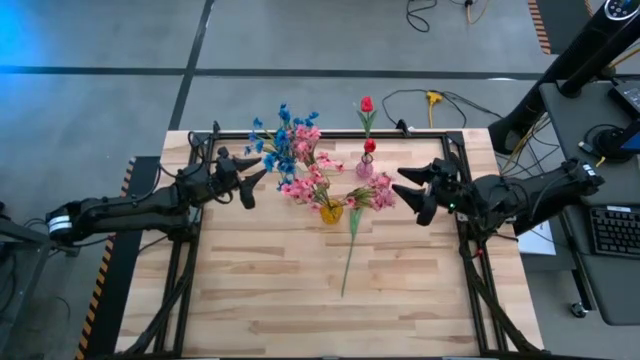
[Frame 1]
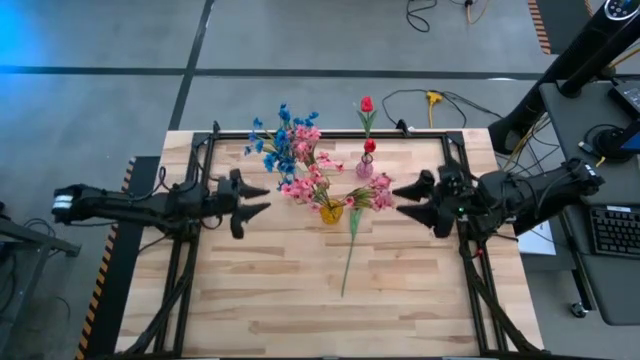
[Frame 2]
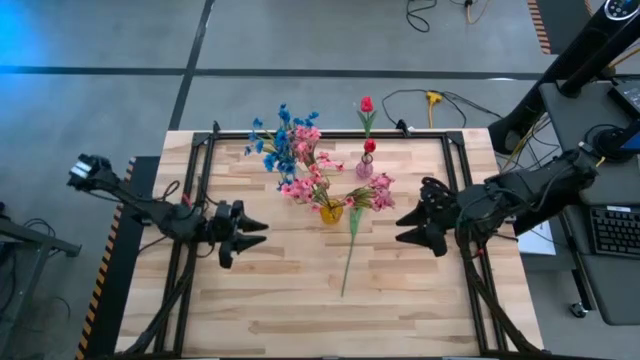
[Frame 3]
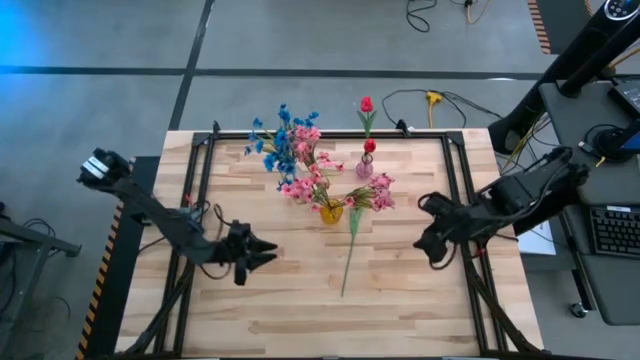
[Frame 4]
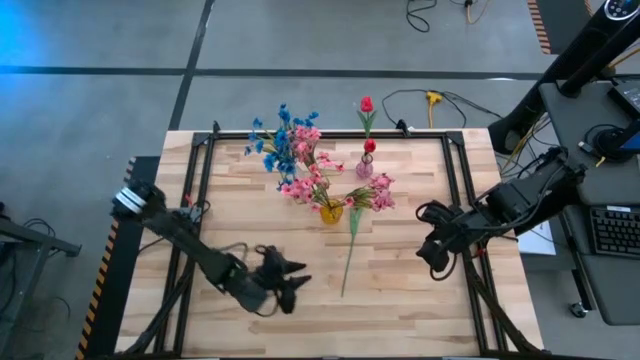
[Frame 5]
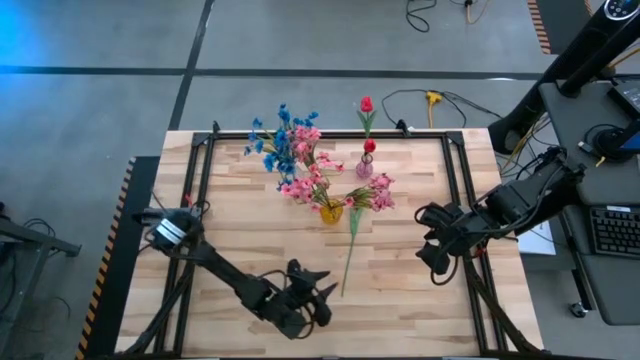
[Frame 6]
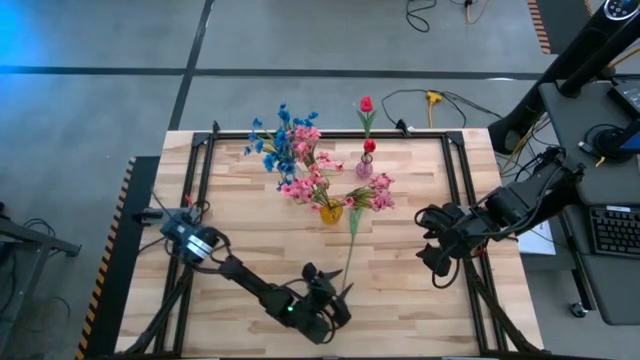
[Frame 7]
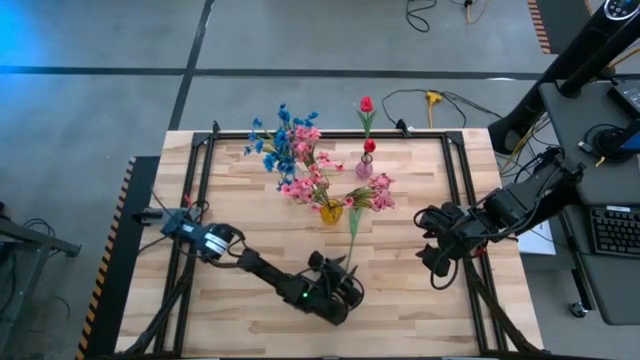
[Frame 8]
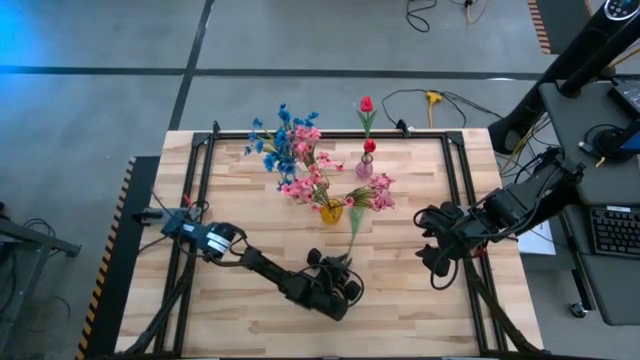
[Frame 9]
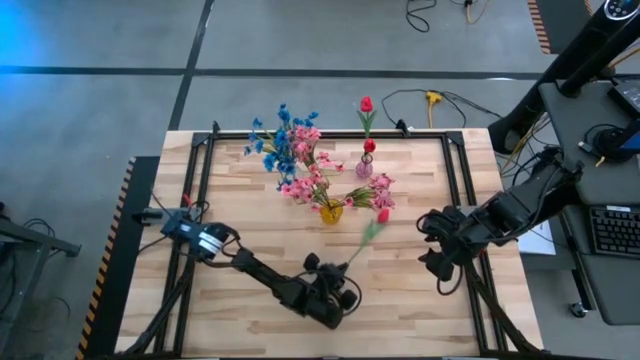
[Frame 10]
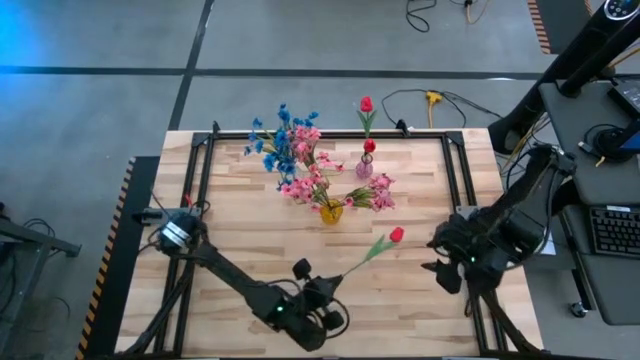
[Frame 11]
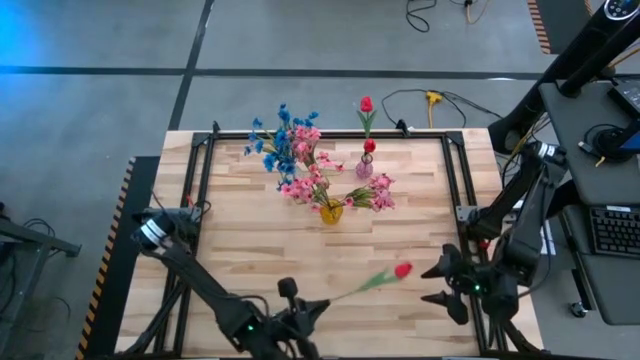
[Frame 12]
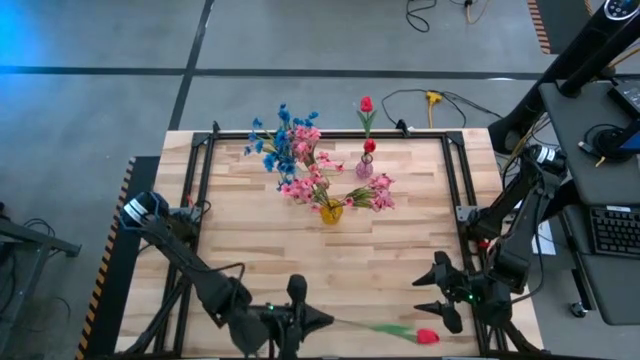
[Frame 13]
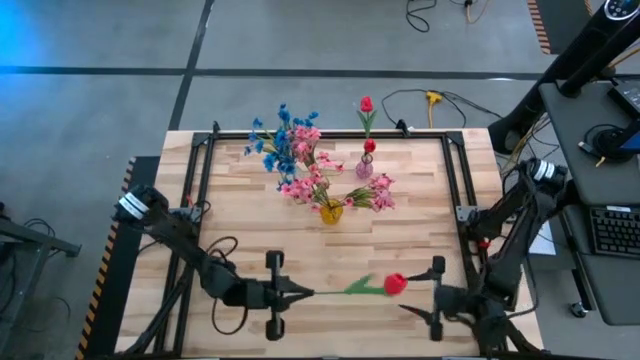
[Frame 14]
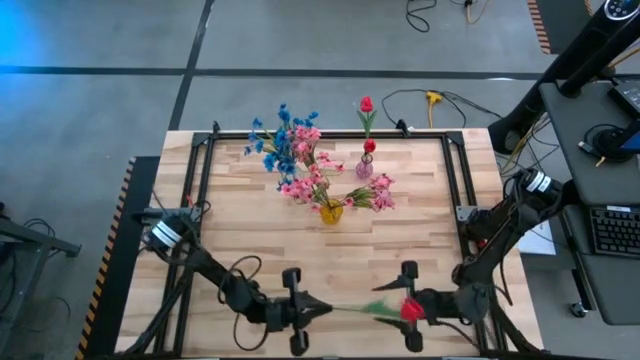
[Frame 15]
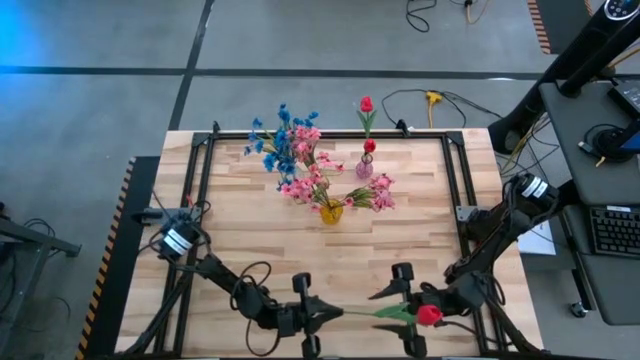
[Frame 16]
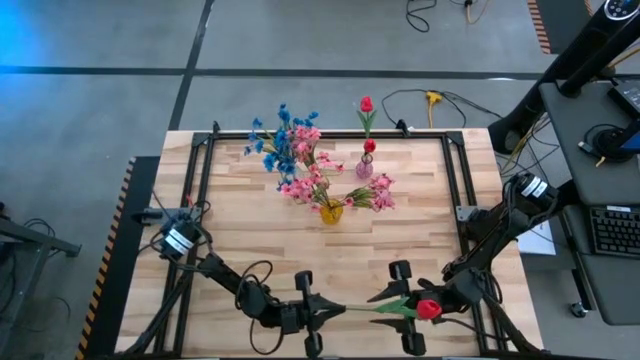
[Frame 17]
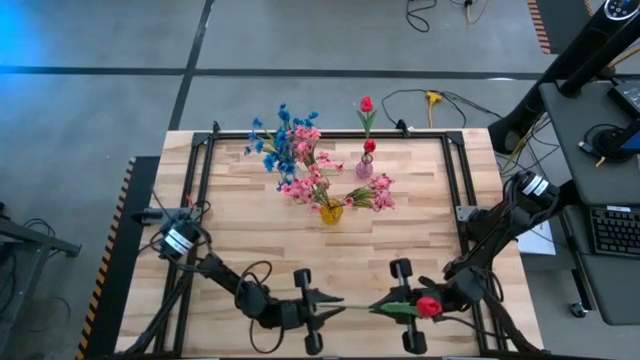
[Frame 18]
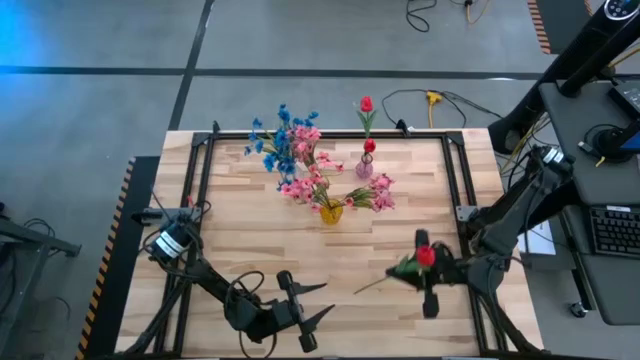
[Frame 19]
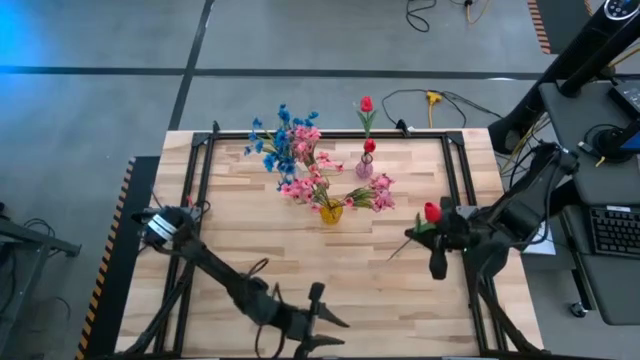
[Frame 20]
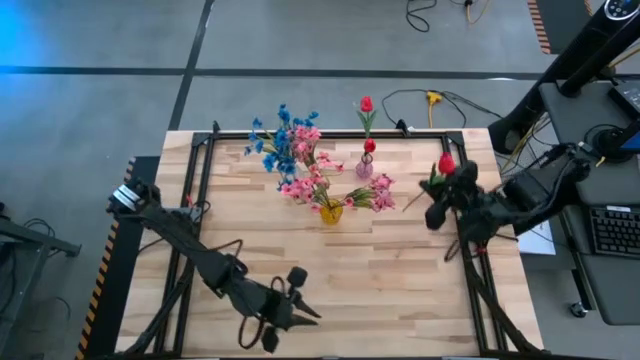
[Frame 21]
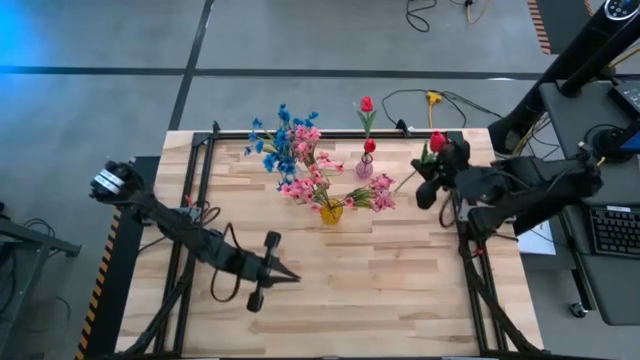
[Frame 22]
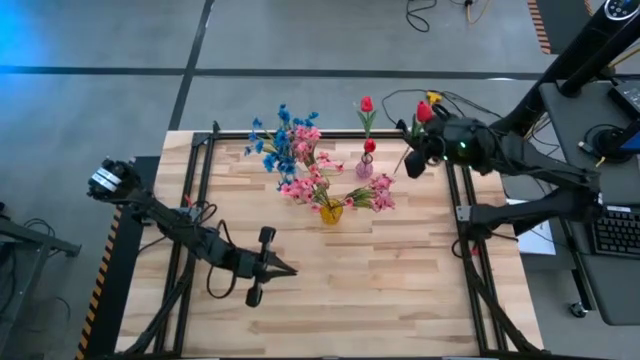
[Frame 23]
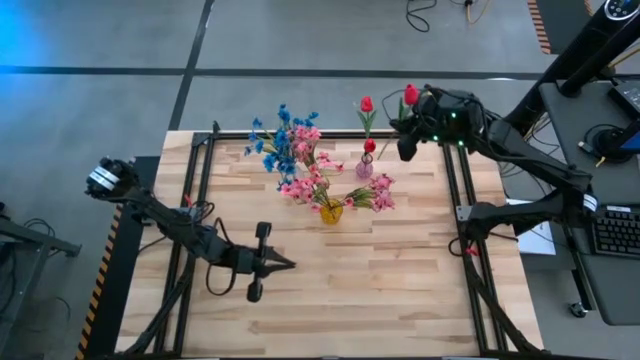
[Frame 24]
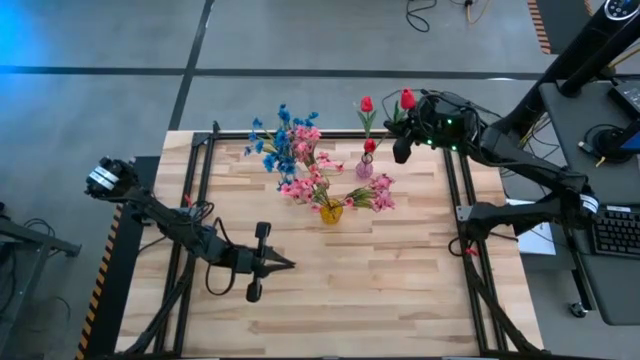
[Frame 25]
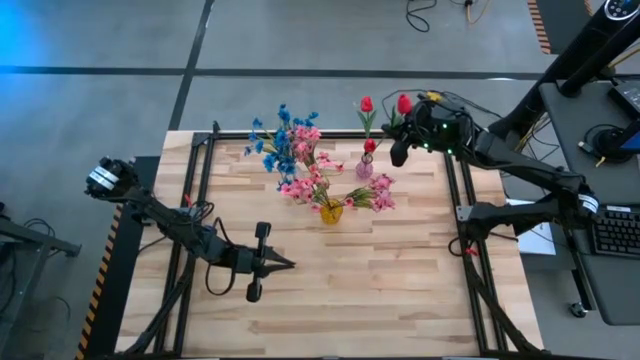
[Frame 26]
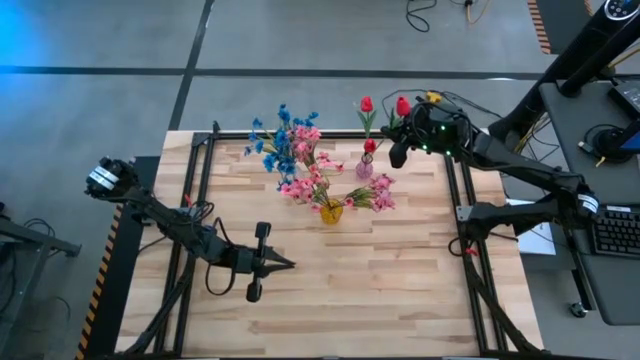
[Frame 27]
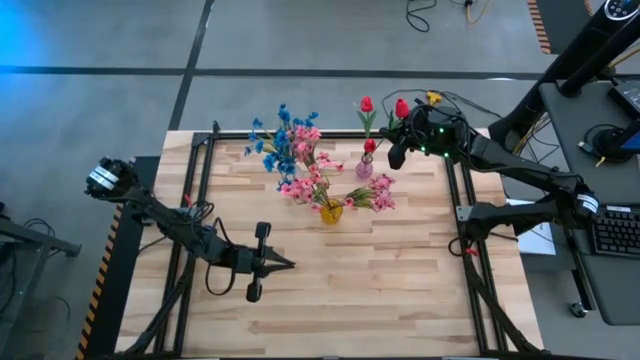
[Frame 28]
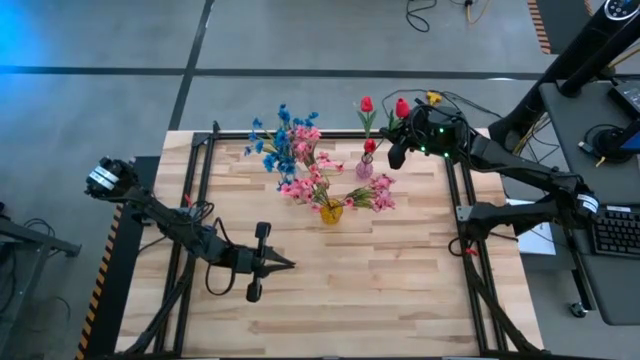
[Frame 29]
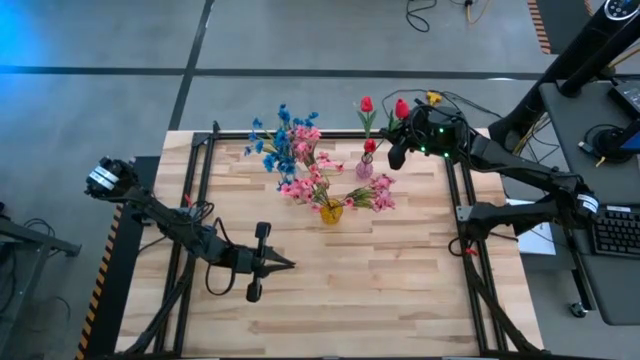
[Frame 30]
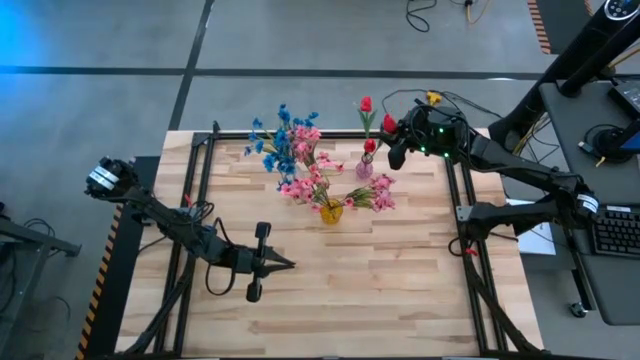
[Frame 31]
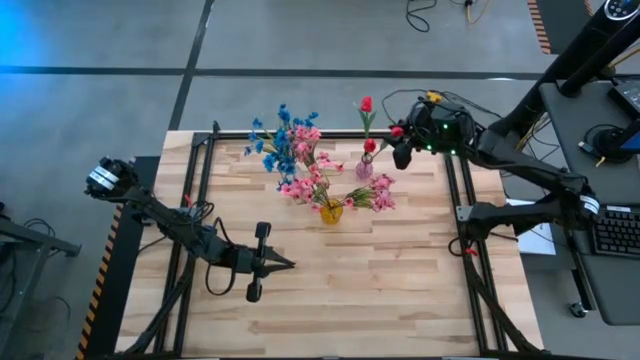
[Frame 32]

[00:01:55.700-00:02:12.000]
Task: Sort flowers into vase by color
Put the red tulip into violet vase

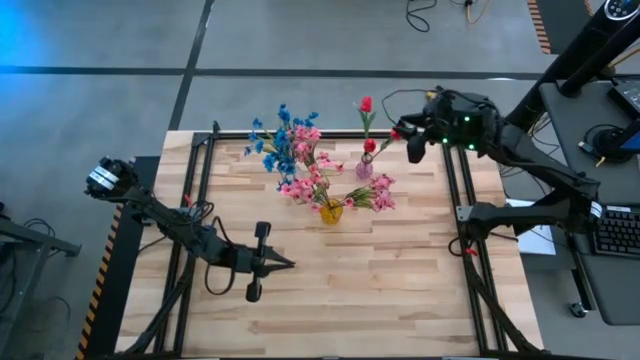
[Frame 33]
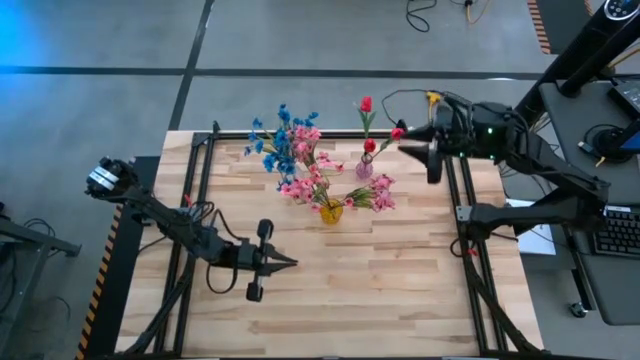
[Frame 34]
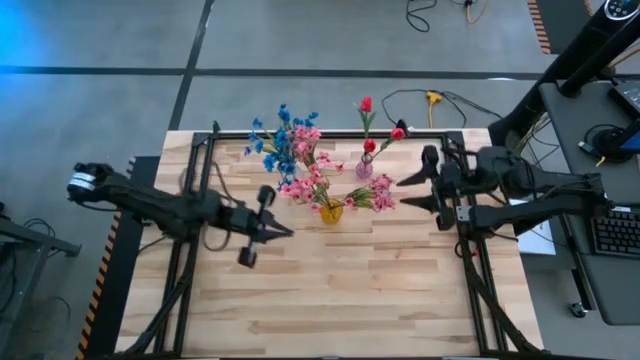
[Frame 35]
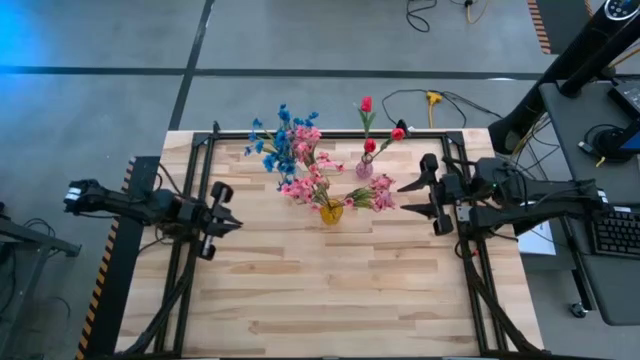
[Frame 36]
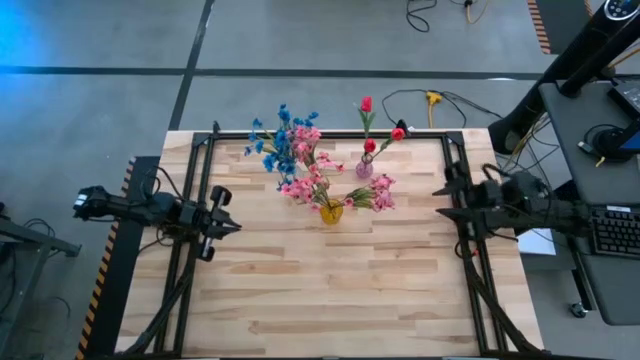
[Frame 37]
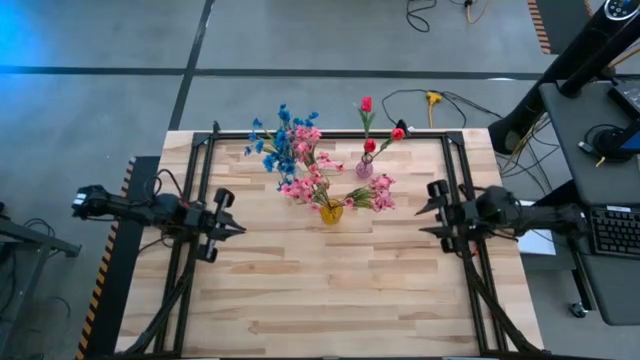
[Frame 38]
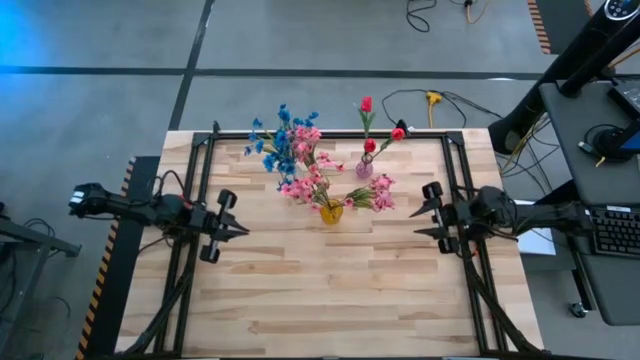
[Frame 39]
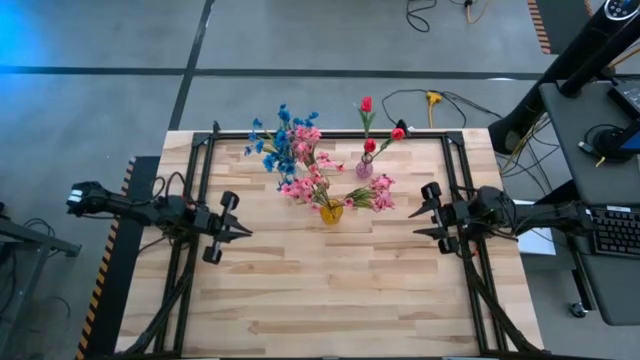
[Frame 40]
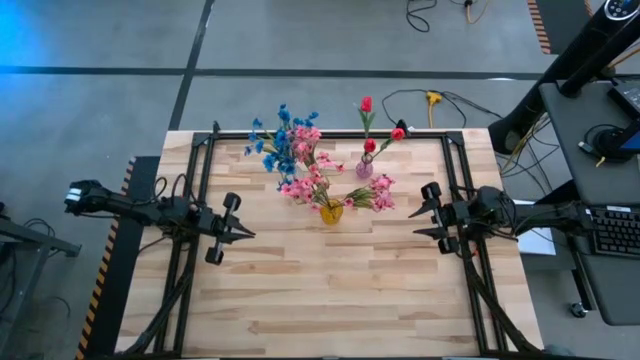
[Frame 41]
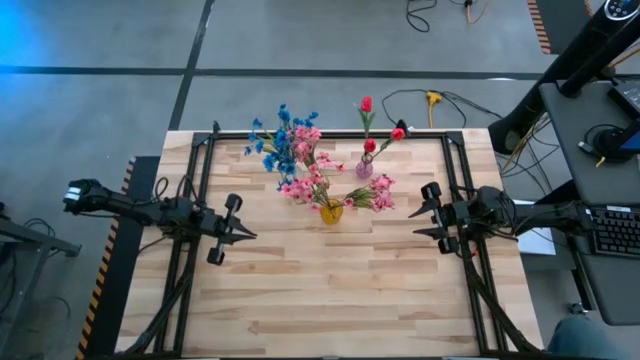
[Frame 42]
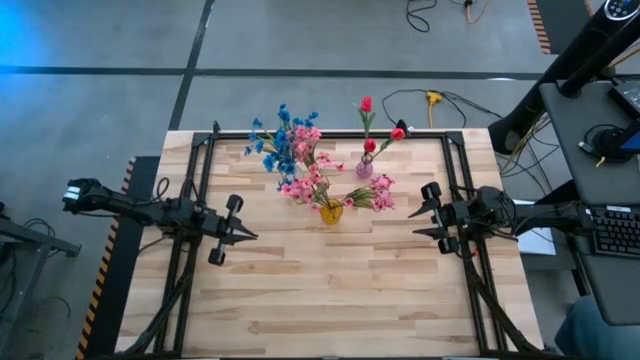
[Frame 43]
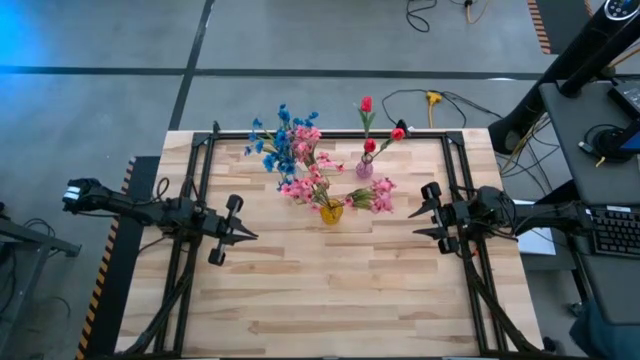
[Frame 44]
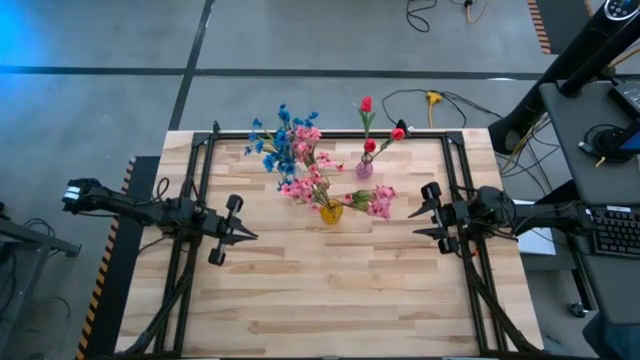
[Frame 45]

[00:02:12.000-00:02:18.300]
Return to Home Position
